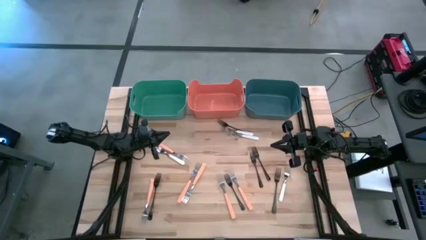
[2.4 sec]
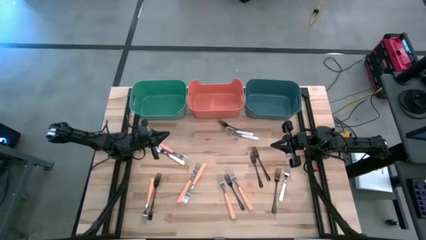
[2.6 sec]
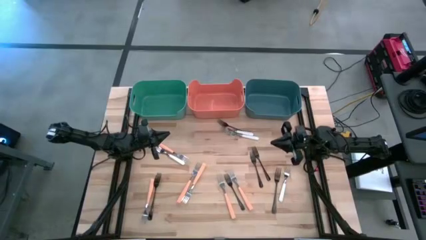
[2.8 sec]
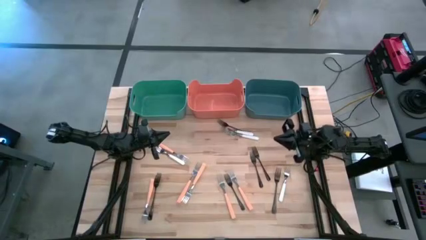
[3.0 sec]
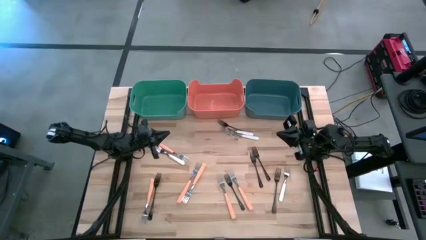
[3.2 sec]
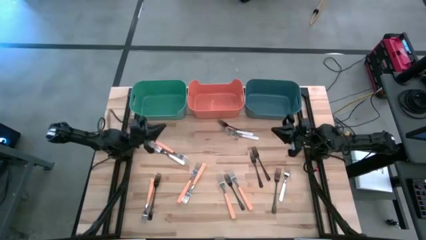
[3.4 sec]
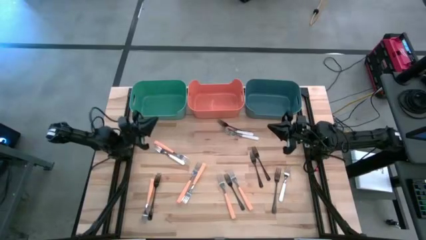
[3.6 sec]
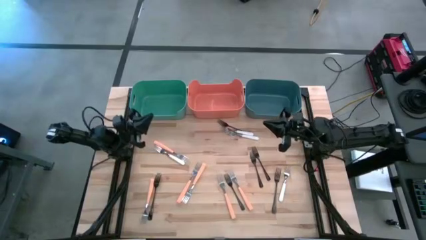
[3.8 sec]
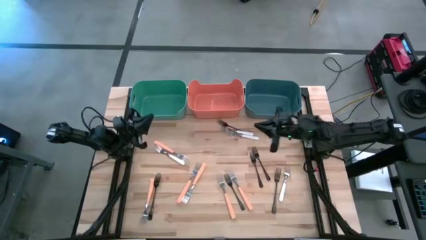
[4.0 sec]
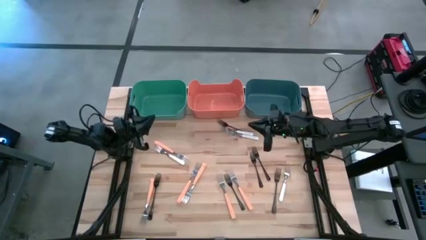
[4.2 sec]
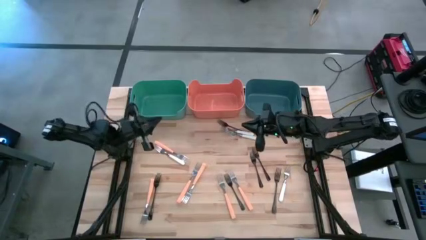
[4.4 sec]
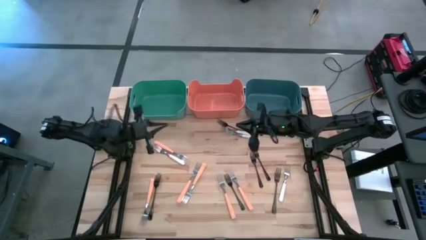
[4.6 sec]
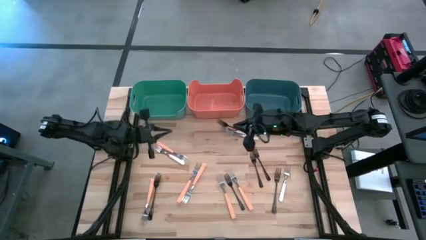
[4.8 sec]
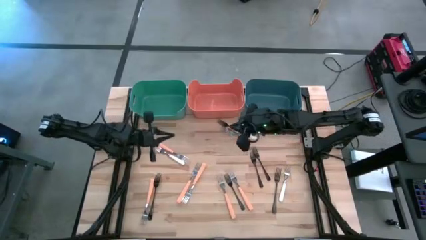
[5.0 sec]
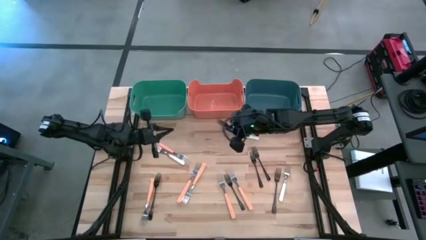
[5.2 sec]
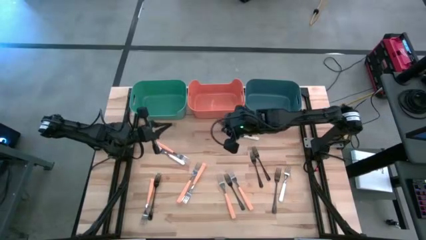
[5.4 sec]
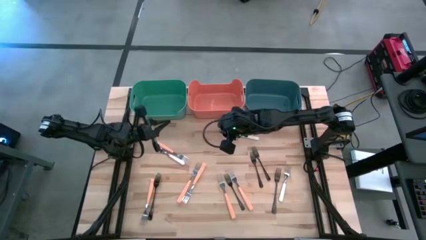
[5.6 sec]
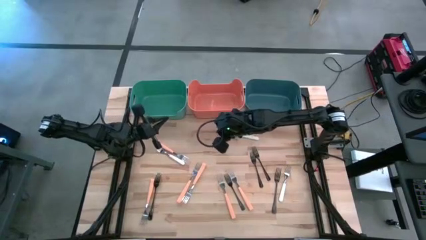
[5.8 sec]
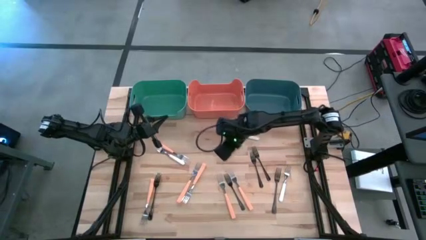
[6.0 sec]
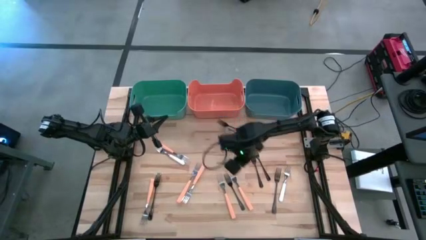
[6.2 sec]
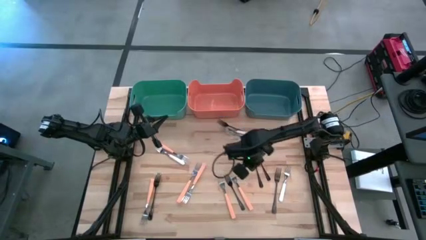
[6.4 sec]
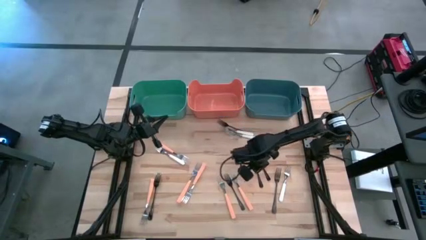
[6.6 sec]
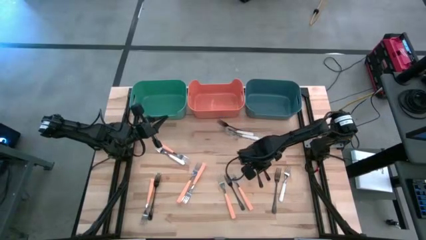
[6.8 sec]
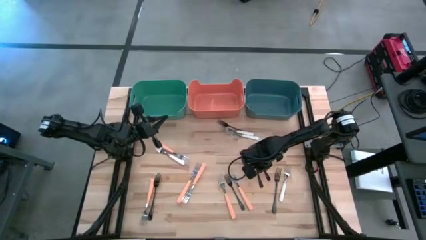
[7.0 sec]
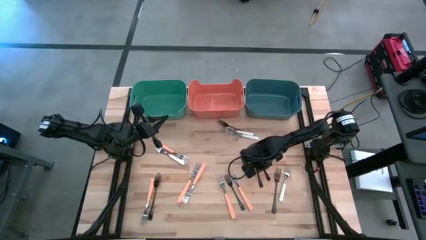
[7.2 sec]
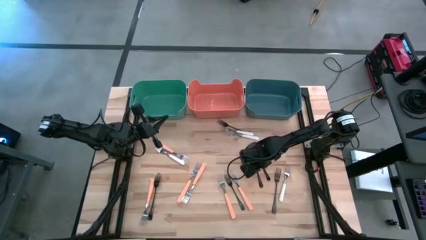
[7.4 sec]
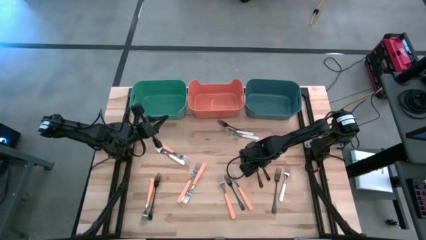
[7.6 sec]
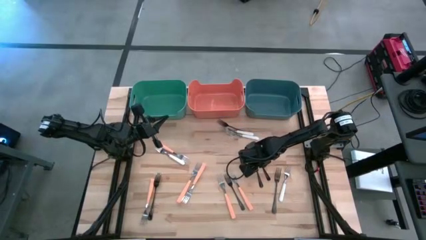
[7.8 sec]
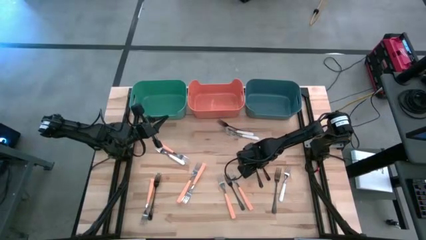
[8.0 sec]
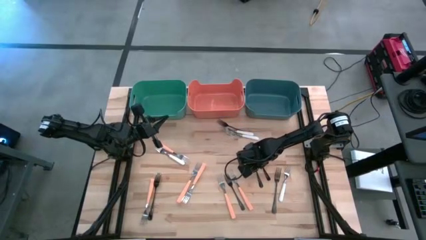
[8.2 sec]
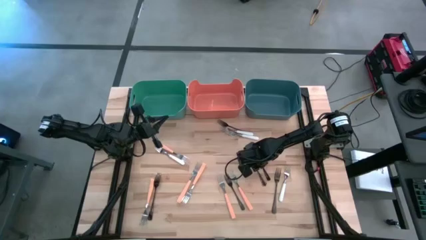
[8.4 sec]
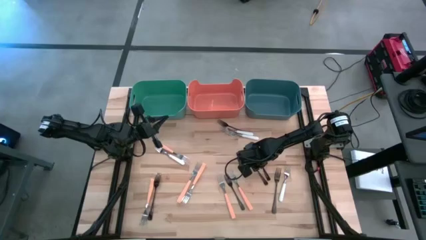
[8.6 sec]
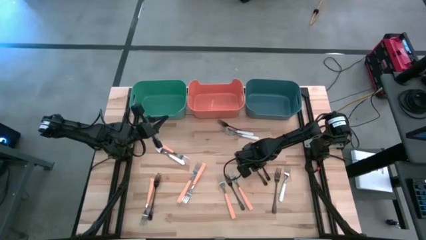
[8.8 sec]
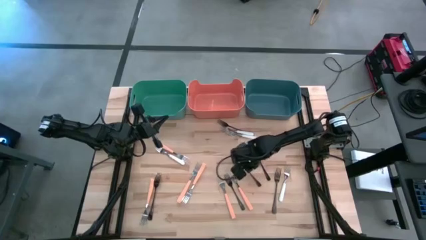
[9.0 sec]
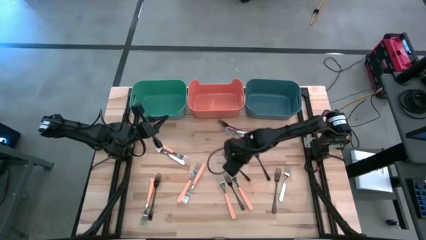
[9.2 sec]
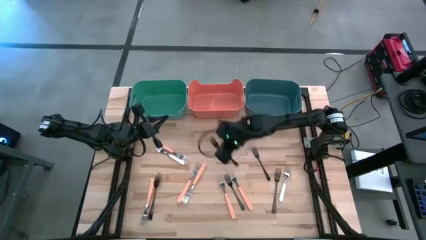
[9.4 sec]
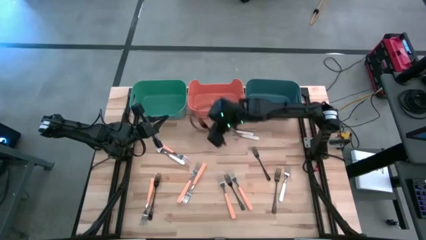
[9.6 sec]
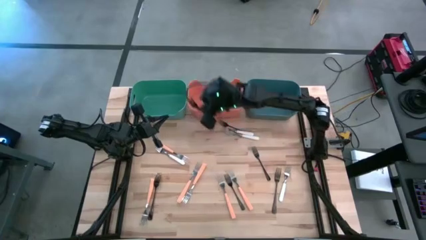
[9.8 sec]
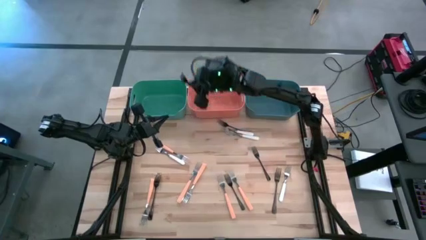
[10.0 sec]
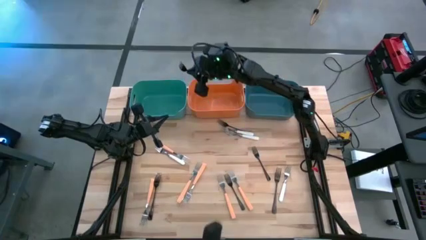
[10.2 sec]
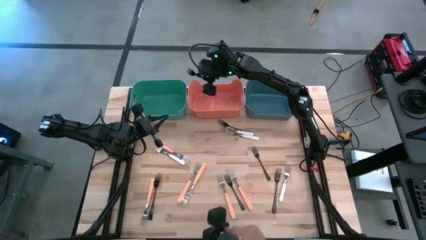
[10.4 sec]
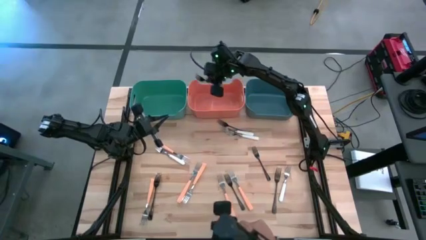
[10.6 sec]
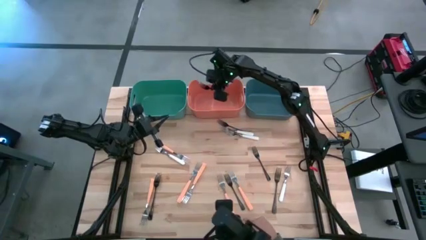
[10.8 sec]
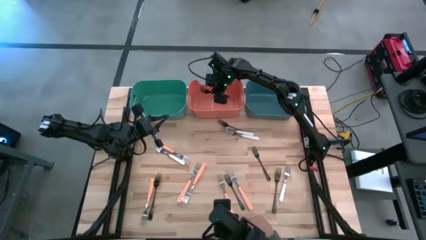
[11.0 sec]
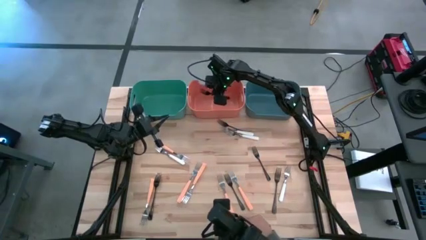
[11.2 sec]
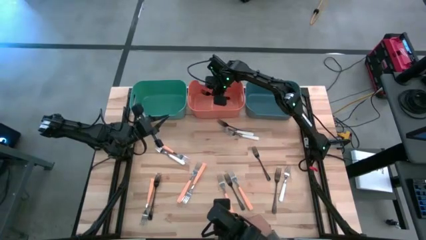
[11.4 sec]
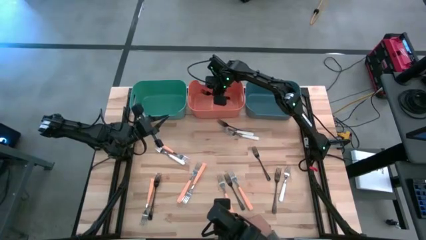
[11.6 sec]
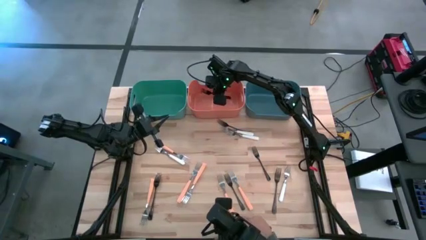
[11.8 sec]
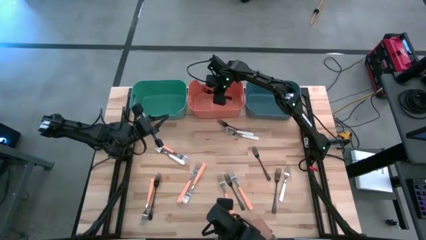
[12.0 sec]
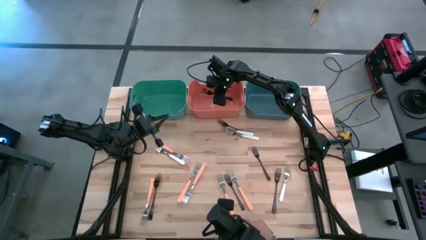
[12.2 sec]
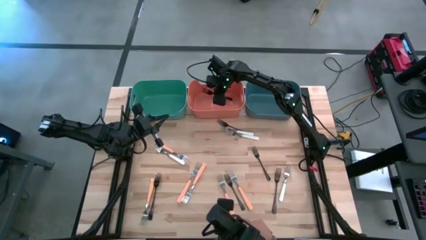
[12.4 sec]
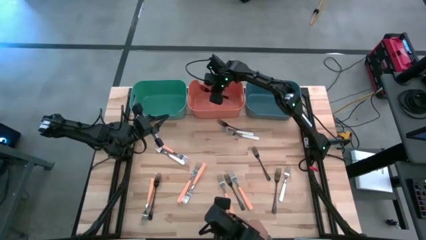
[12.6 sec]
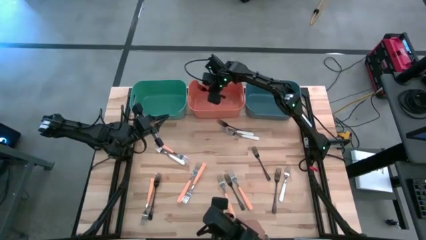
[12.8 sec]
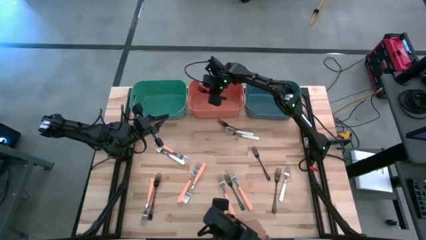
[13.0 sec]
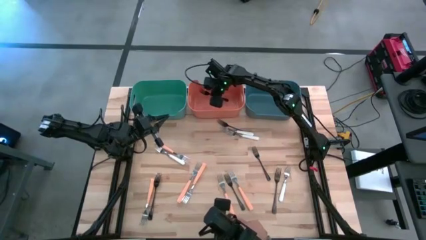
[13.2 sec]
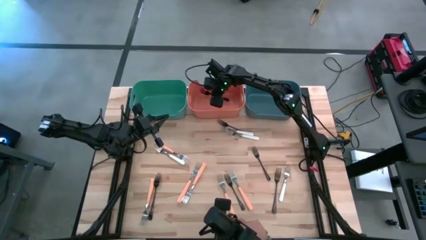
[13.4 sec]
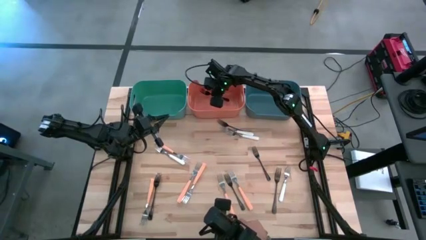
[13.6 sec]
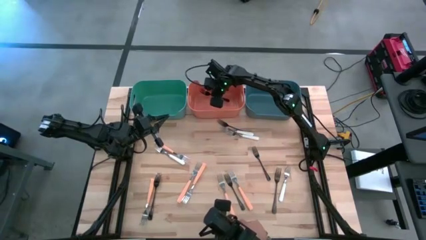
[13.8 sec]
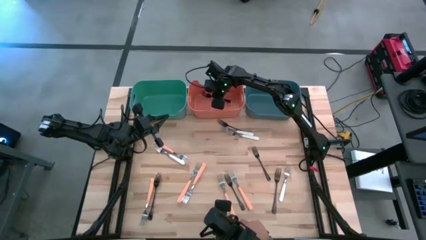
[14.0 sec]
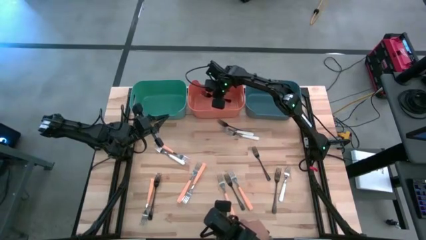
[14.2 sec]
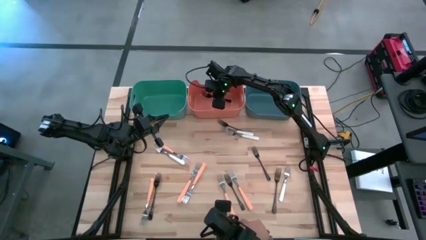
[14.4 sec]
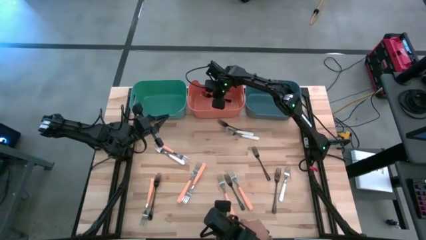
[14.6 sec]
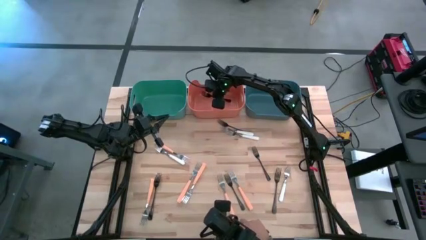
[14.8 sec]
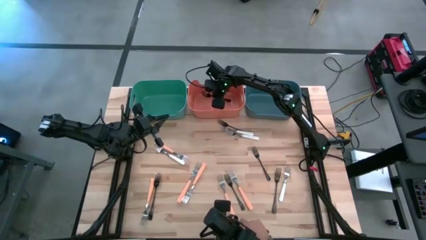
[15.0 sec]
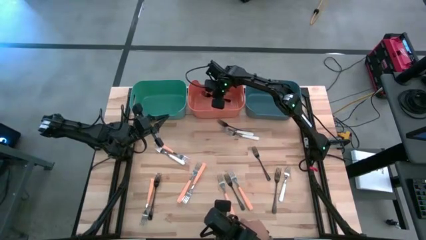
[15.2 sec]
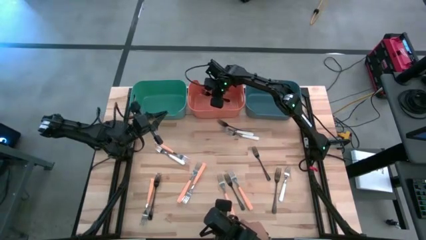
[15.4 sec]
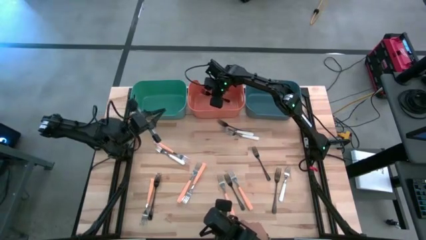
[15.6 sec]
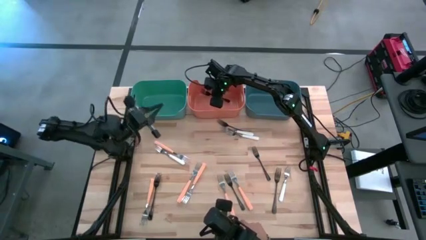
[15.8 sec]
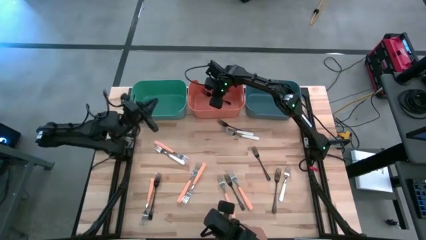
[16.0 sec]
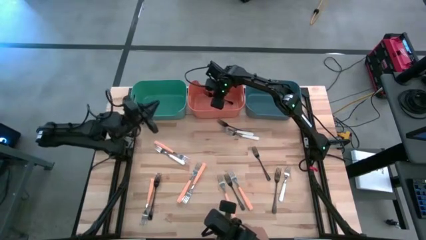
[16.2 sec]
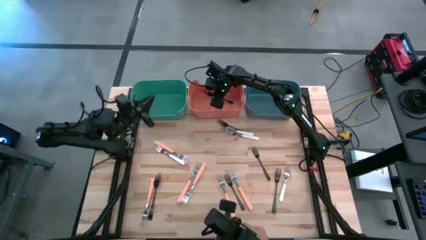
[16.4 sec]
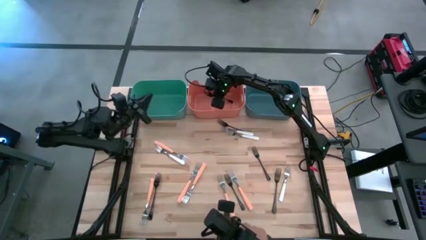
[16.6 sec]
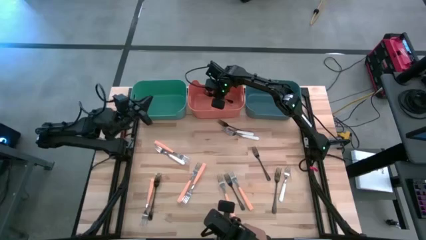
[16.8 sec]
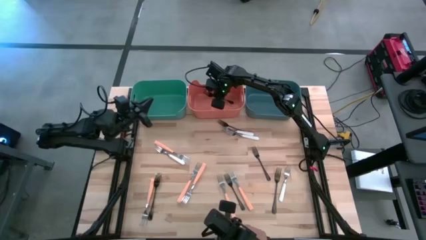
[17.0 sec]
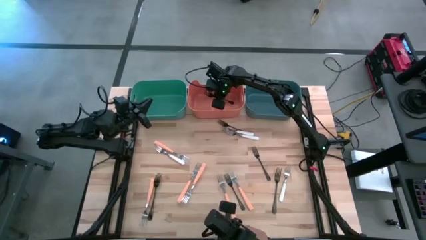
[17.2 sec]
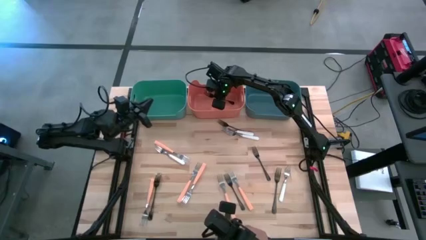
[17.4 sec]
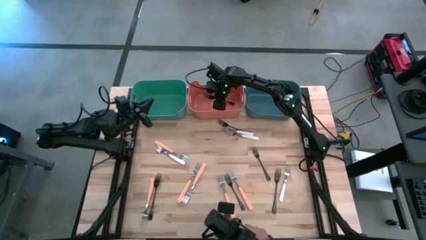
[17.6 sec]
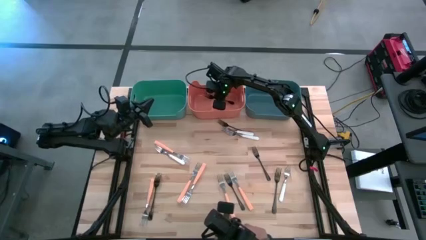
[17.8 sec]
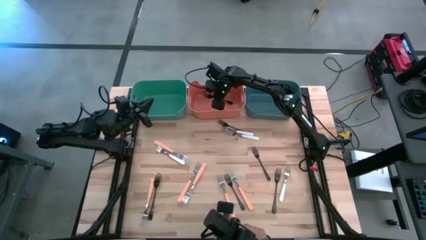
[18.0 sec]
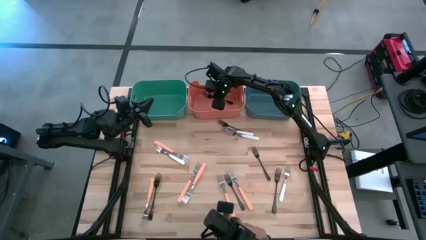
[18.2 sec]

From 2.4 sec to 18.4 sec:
Task: Sort silverware by color (type)
Put the black fork into the orange bin
